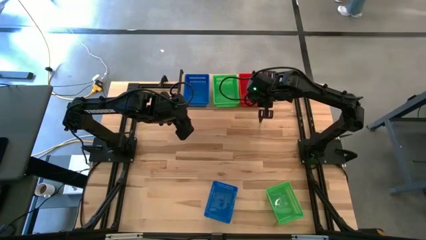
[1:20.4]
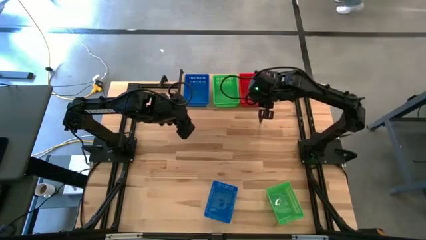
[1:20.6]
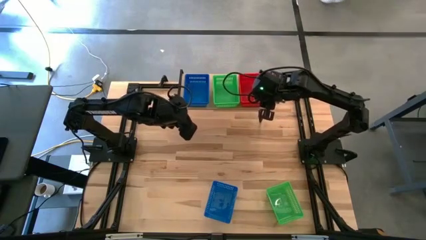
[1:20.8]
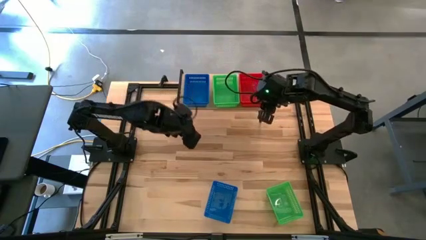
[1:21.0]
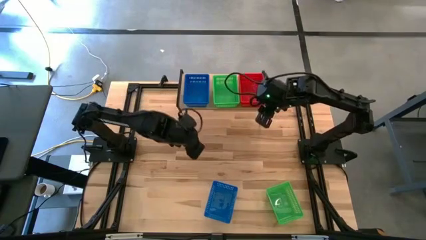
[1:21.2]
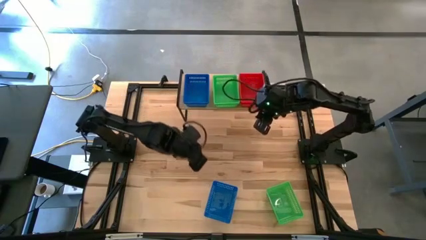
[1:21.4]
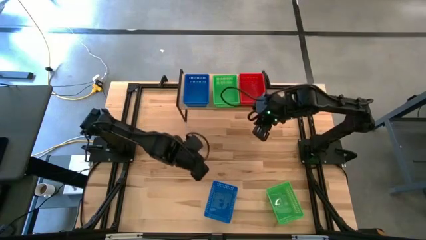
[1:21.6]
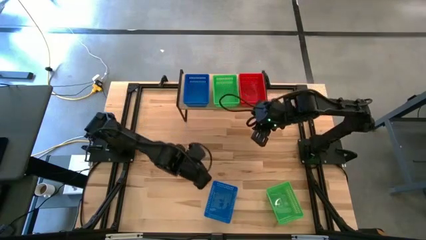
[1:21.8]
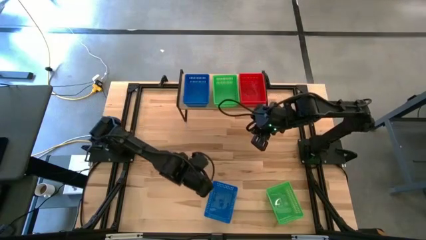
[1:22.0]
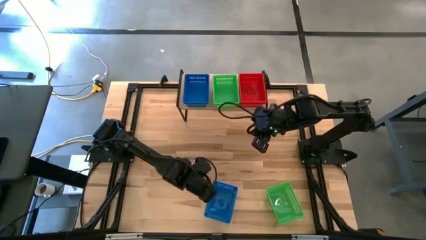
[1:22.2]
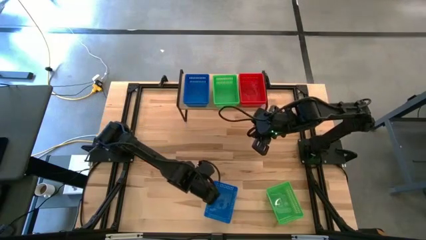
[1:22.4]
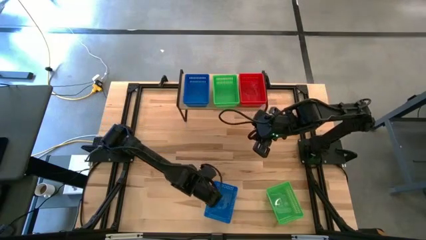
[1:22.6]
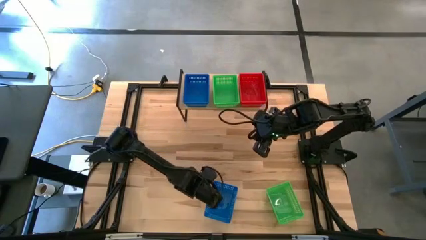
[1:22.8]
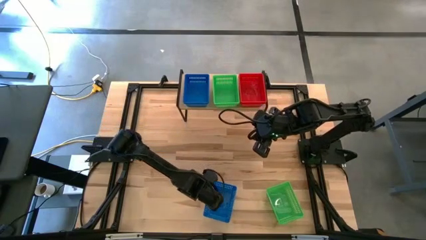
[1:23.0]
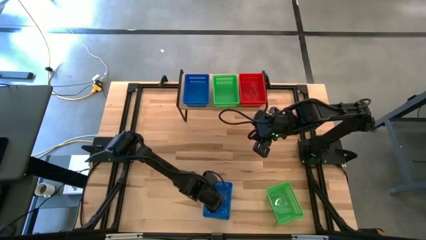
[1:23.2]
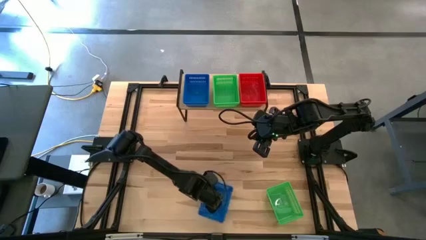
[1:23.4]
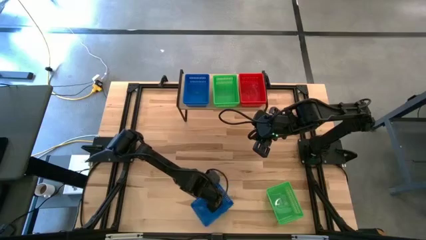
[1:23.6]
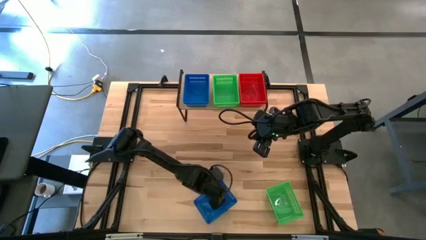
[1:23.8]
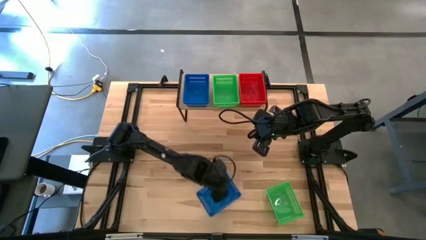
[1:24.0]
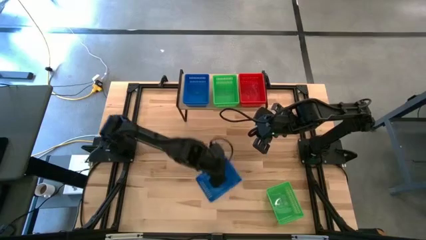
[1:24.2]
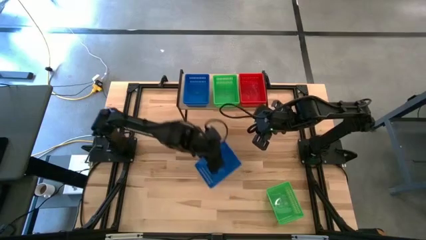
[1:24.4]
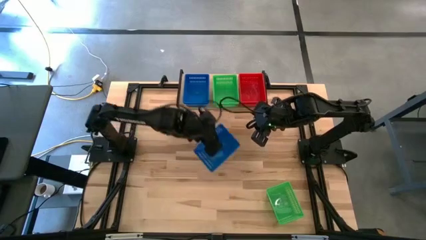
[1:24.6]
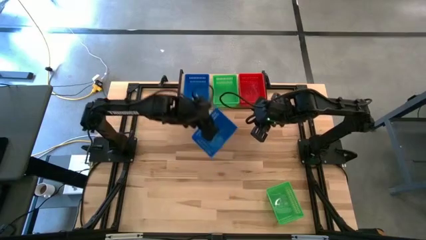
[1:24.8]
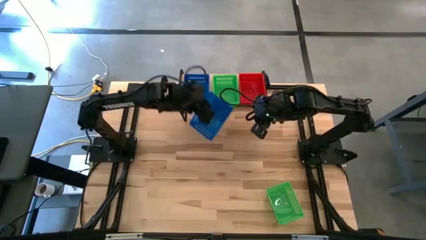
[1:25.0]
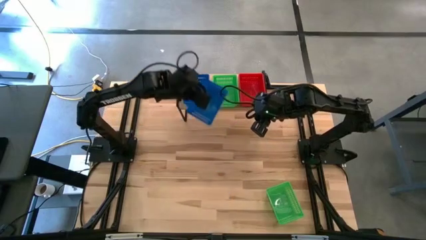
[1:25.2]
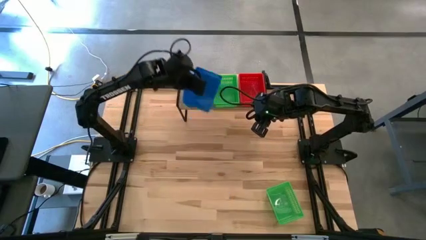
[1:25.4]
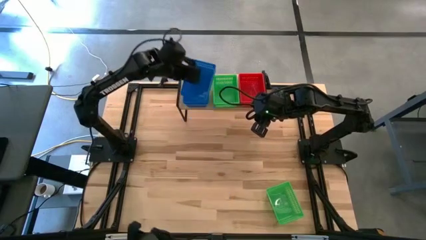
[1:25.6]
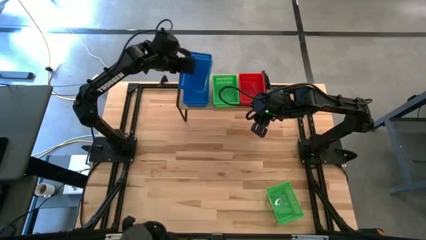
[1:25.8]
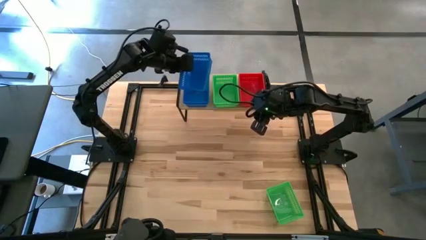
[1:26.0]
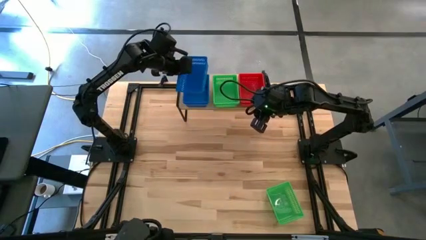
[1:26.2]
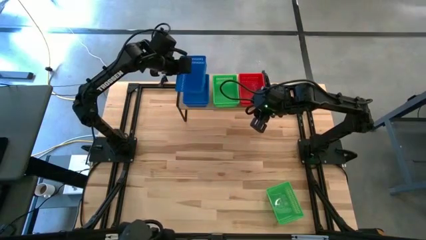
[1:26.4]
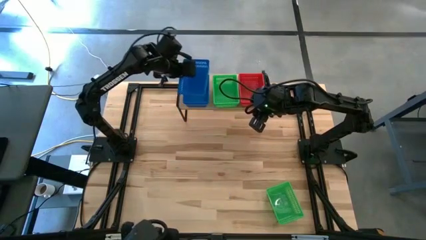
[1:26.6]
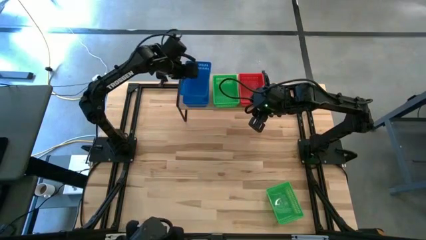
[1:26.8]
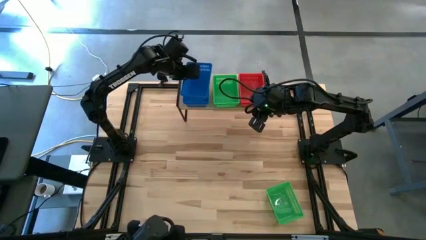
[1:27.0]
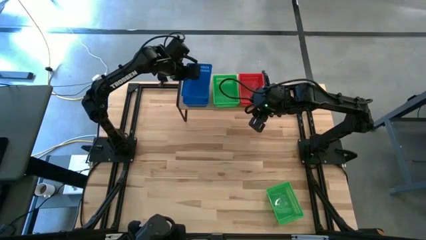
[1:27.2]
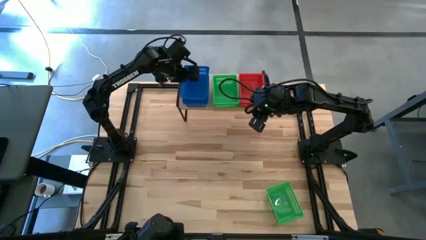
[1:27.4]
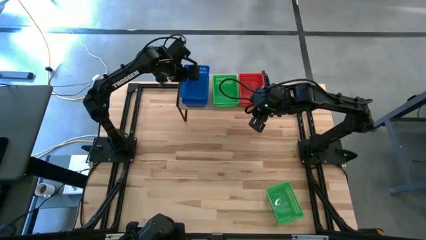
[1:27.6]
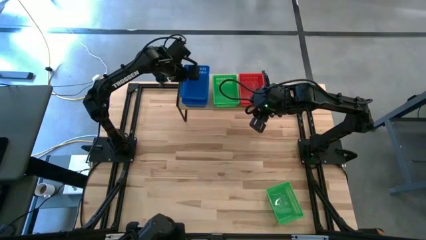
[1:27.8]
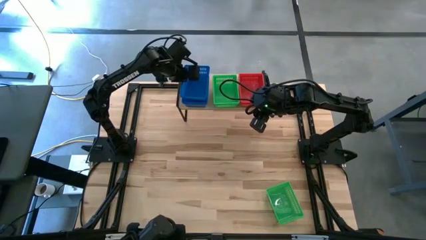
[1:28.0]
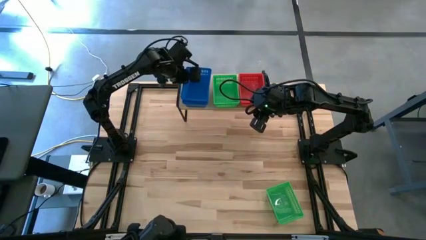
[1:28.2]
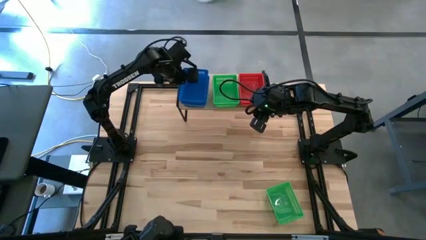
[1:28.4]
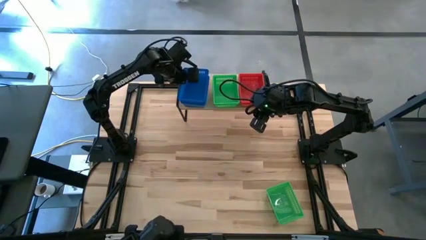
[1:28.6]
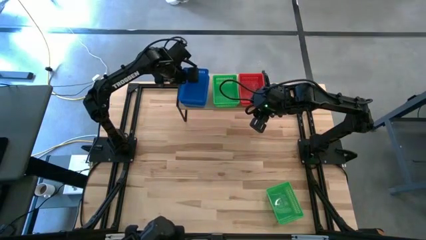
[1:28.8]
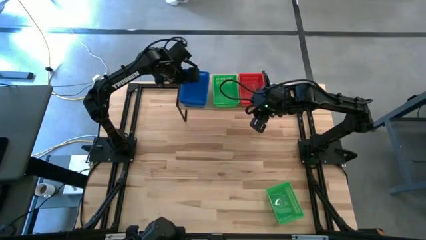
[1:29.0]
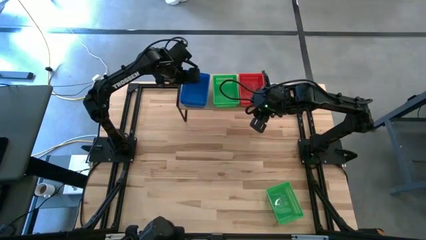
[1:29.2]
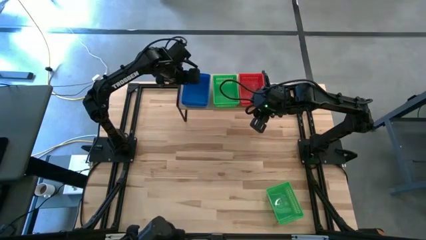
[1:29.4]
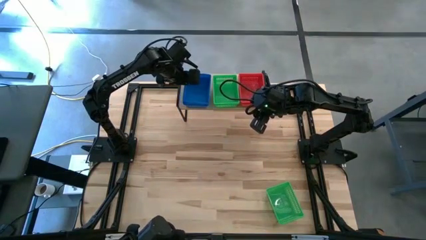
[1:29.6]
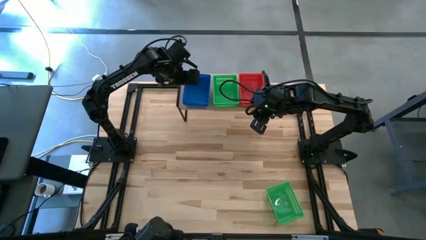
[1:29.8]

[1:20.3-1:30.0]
Task: Stack baskets on shelf by color
Stack the blue bin on top of the other blue bins on the shelf

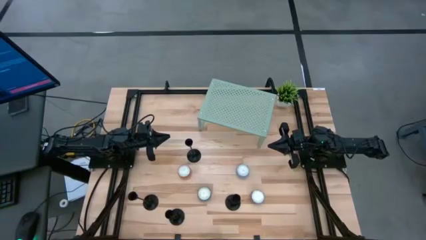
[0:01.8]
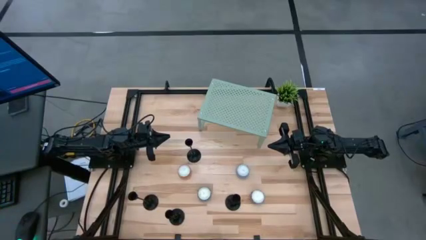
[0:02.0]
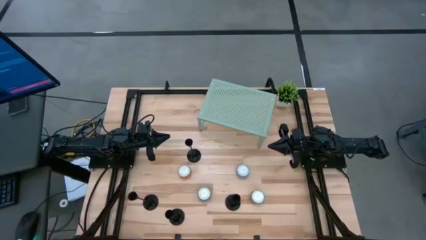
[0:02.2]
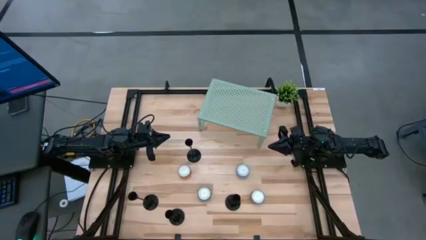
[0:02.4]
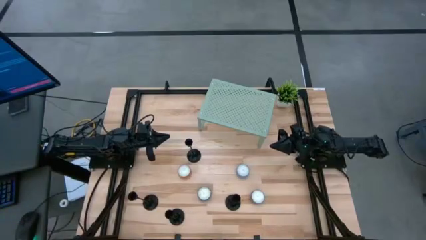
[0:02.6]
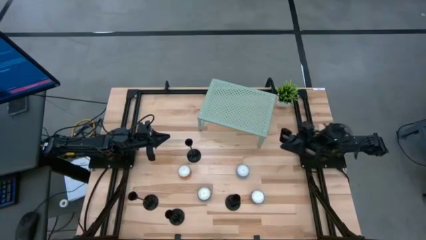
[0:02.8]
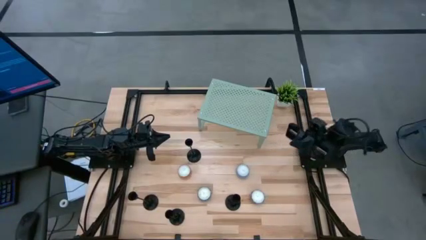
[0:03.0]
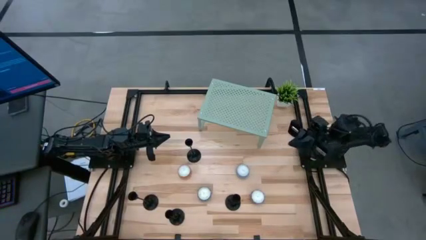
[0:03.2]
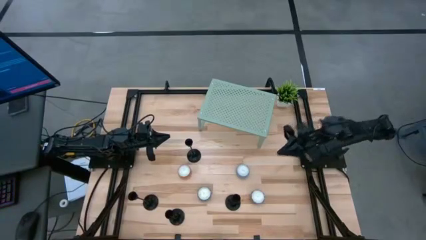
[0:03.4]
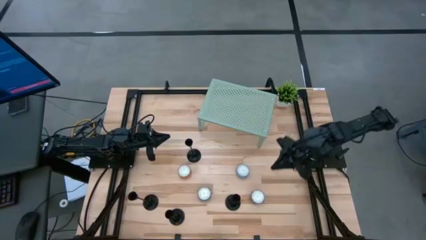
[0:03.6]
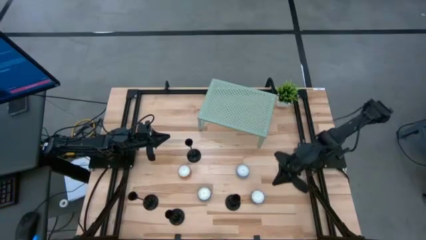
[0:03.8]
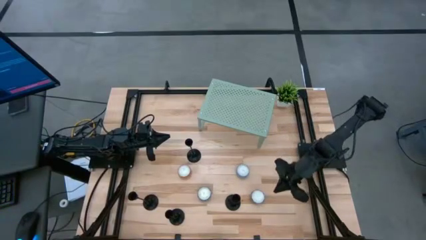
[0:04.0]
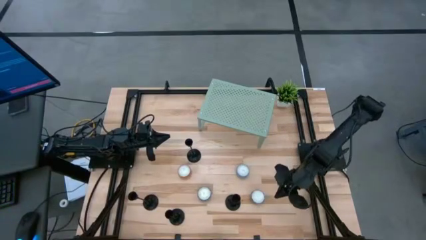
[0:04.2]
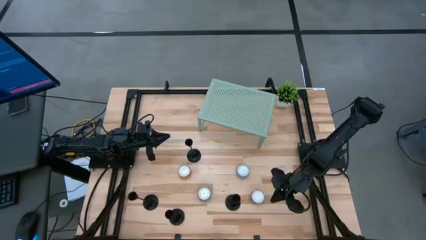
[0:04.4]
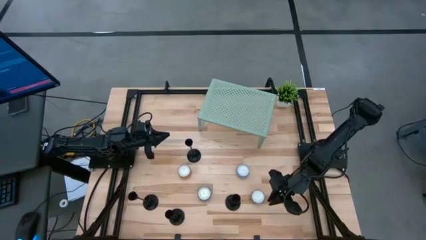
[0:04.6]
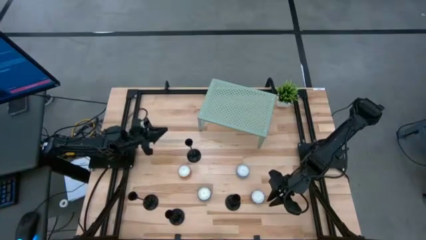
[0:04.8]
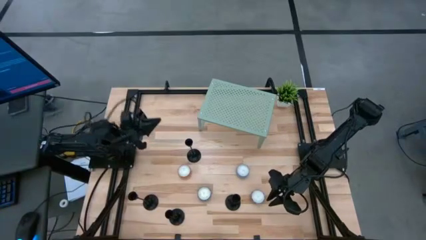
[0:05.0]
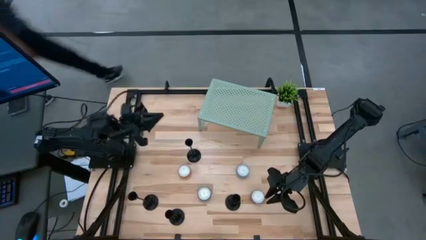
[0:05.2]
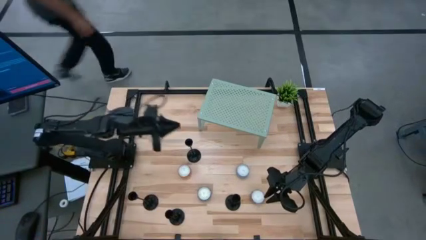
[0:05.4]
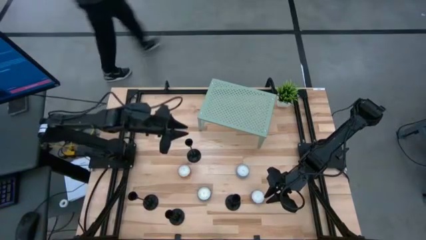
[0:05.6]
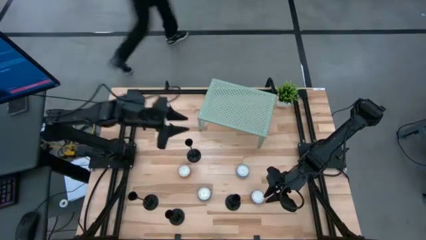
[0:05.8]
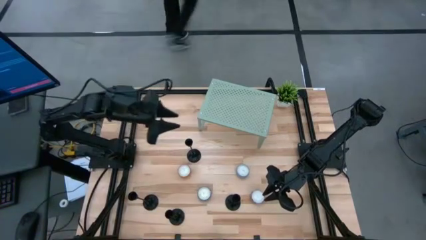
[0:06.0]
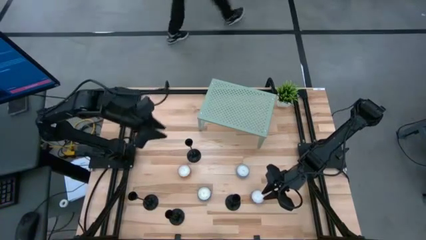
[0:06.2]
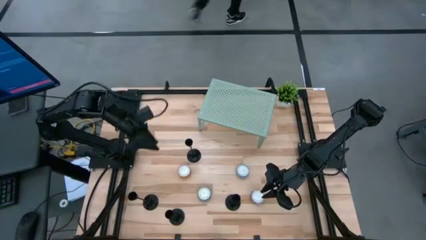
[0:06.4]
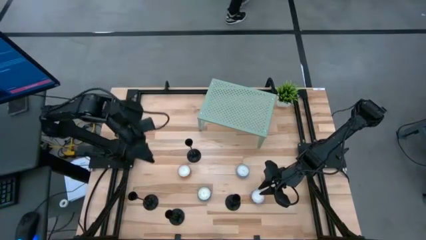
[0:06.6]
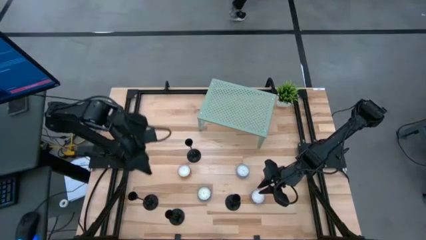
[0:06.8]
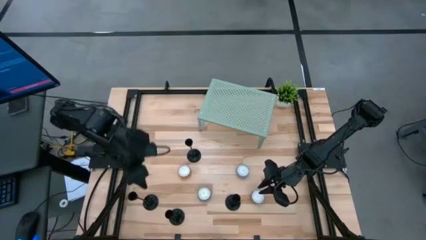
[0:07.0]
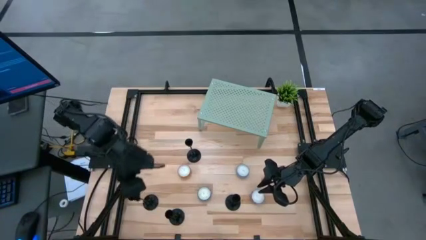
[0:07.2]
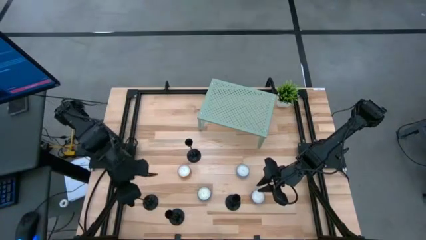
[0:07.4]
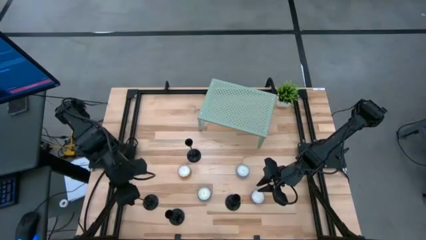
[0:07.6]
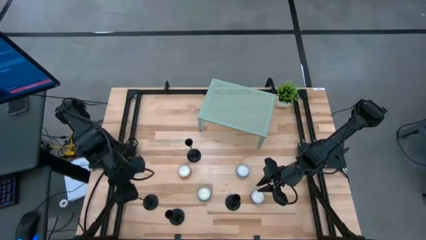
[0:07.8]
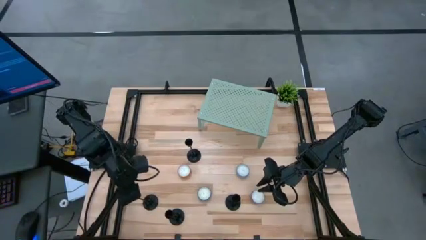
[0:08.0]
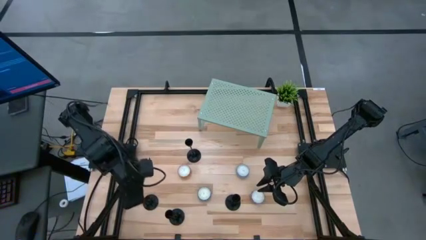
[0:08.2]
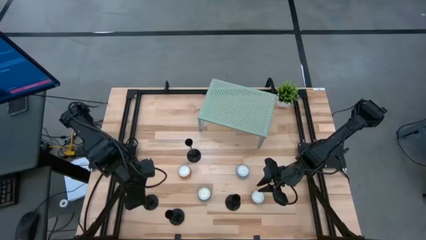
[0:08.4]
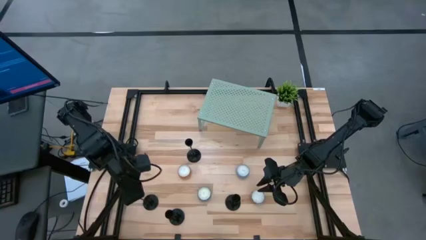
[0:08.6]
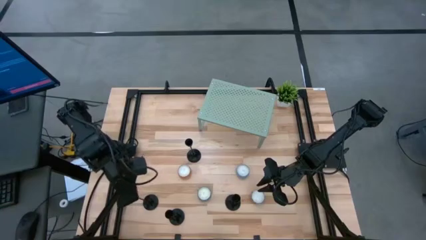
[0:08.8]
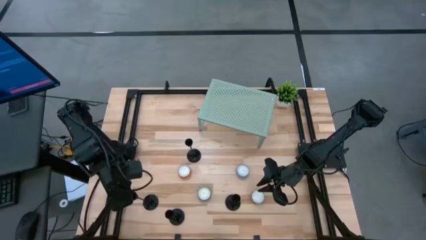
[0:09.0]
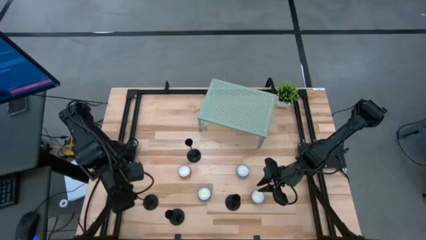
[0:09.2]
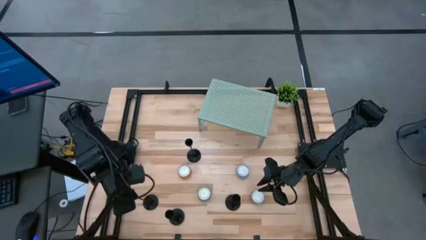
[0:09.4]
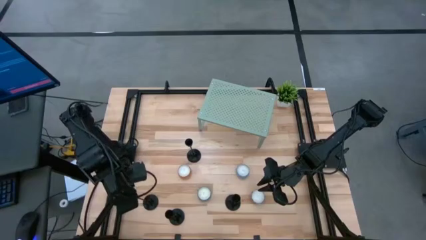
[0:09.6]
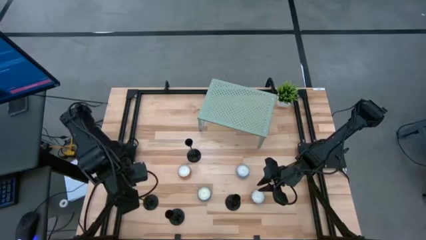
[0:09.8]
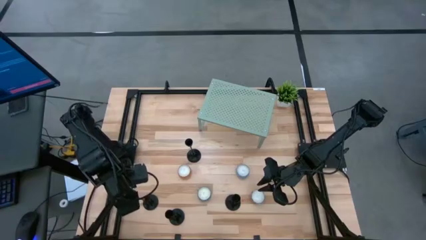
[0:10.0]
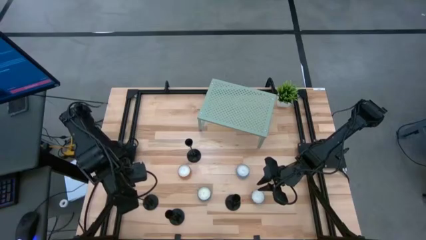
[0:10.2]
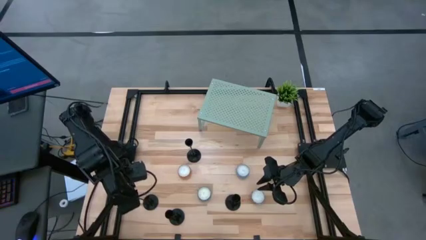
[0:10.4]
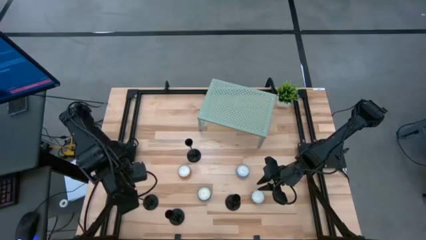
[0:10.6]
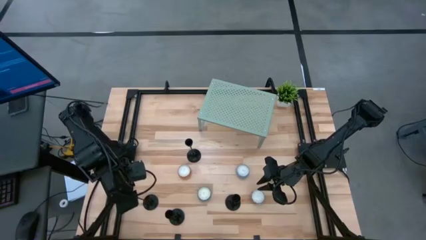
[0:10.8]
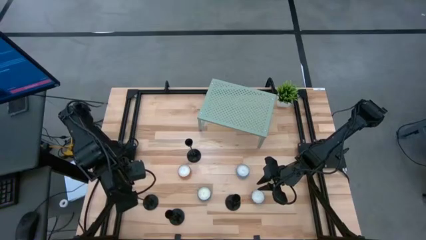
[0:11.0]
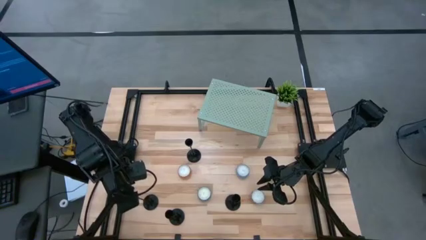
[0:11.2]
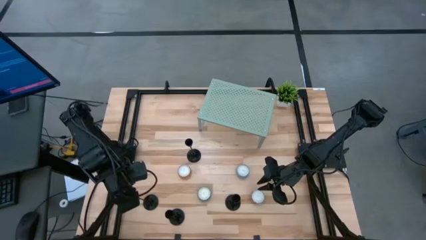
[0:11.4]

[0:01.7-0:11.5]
Task: Pick & Place candle stick holders
Put the black candle holder on the shelf
